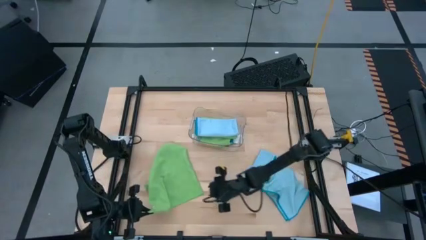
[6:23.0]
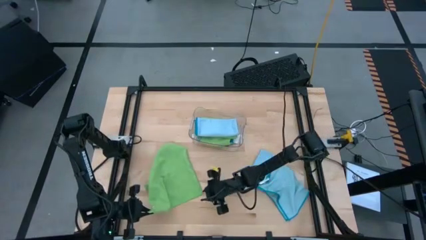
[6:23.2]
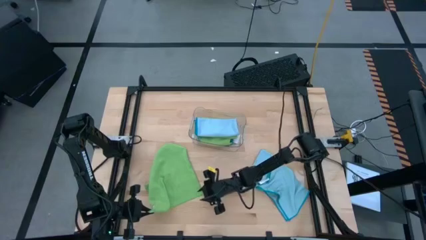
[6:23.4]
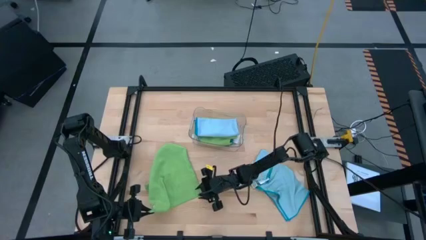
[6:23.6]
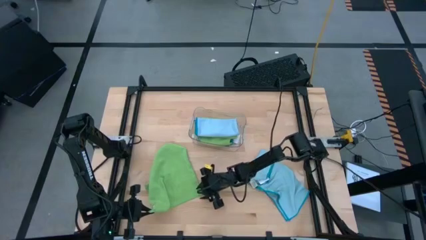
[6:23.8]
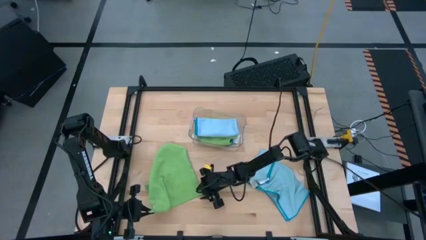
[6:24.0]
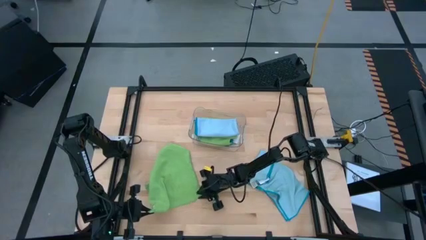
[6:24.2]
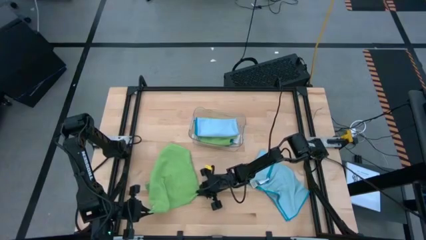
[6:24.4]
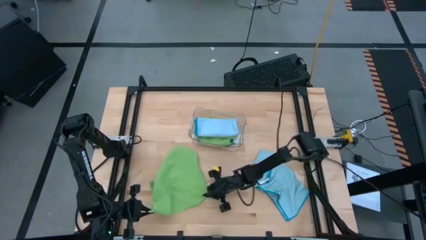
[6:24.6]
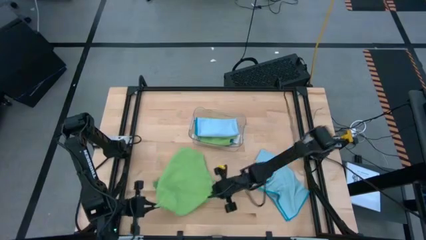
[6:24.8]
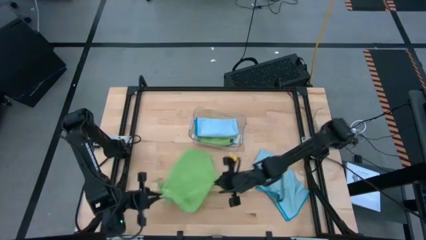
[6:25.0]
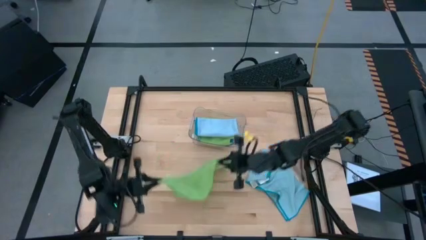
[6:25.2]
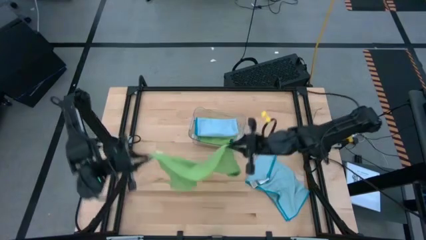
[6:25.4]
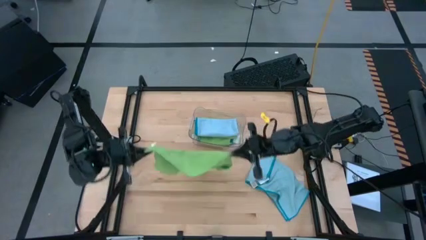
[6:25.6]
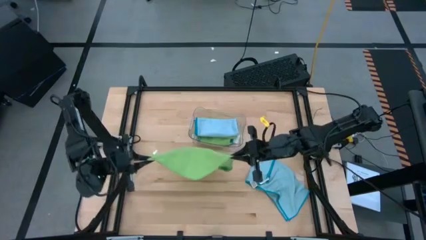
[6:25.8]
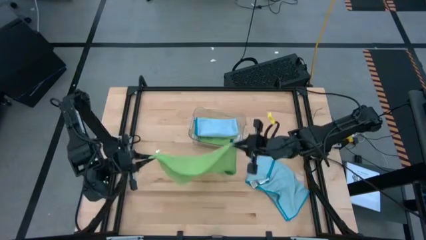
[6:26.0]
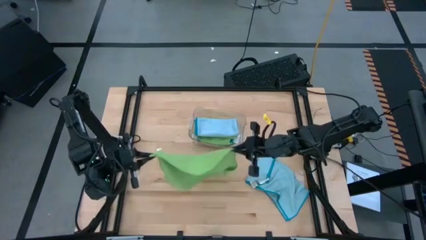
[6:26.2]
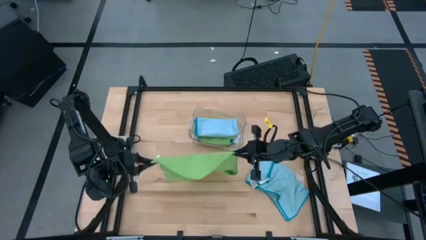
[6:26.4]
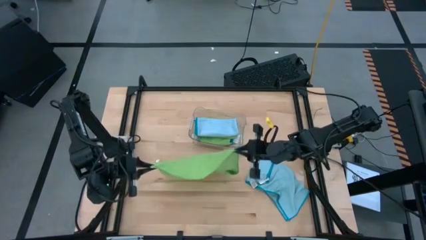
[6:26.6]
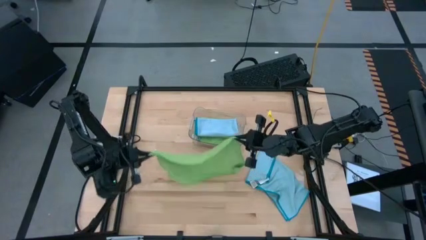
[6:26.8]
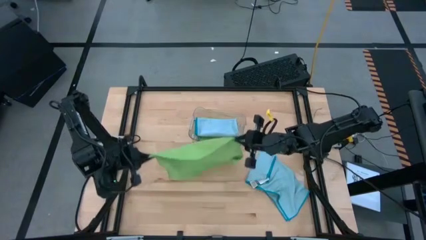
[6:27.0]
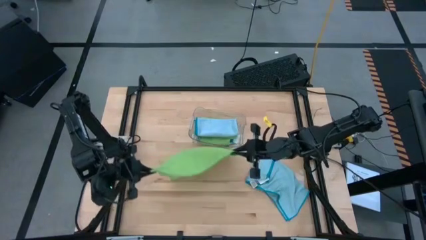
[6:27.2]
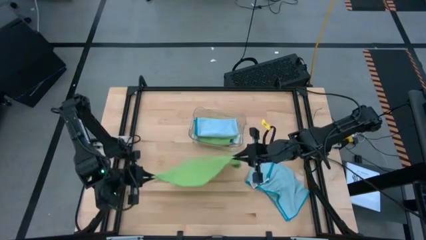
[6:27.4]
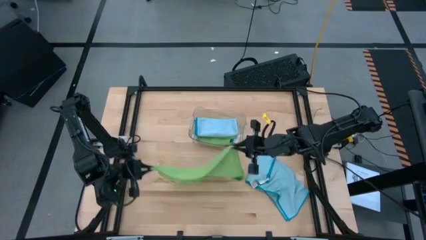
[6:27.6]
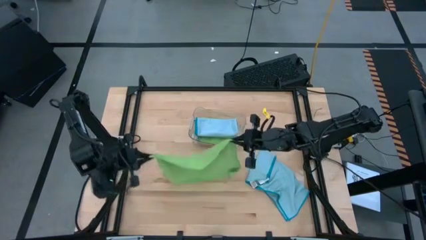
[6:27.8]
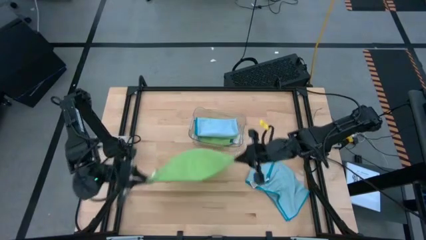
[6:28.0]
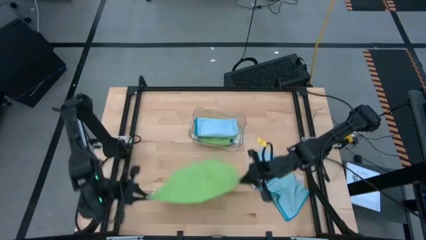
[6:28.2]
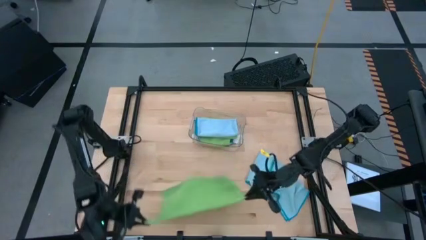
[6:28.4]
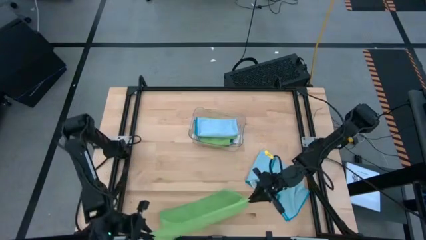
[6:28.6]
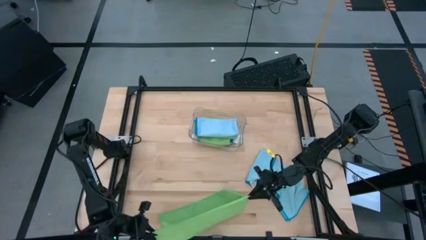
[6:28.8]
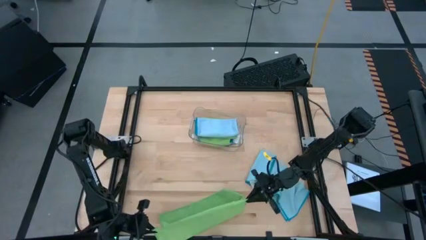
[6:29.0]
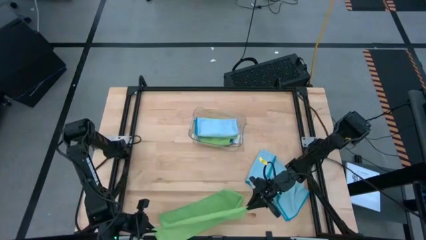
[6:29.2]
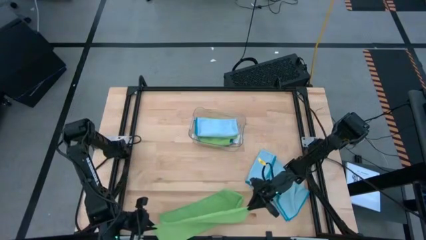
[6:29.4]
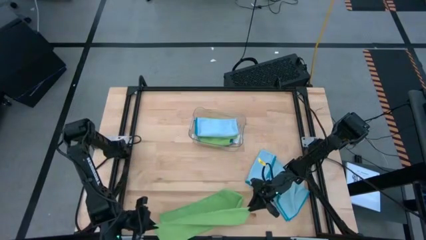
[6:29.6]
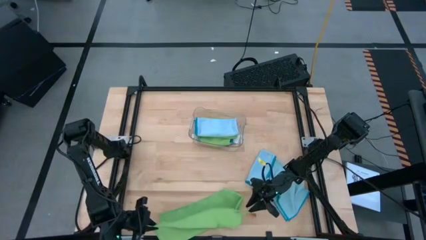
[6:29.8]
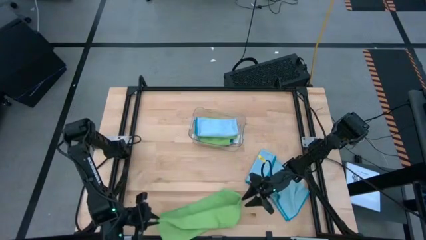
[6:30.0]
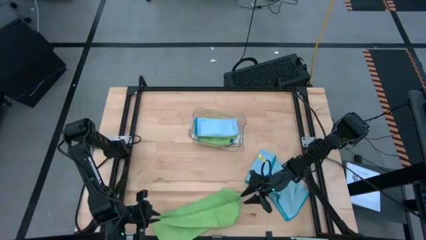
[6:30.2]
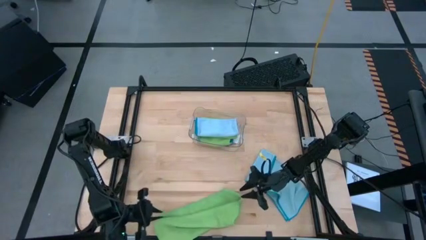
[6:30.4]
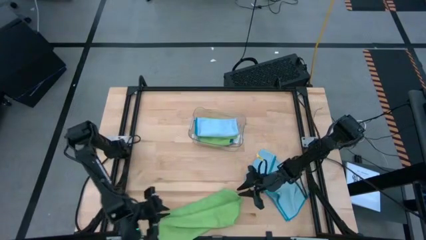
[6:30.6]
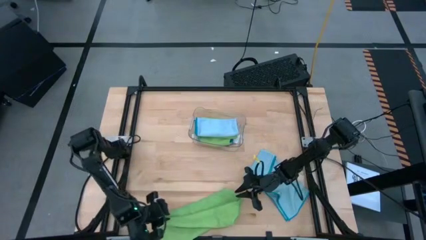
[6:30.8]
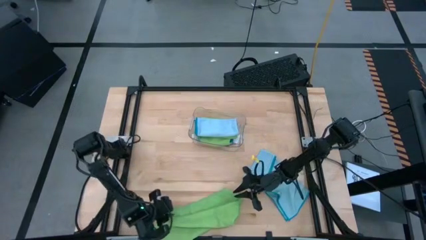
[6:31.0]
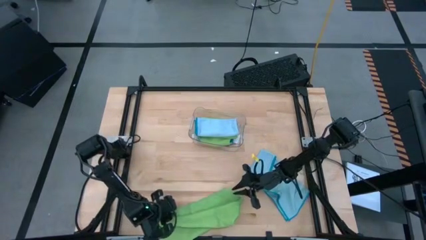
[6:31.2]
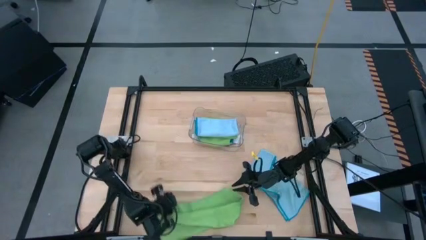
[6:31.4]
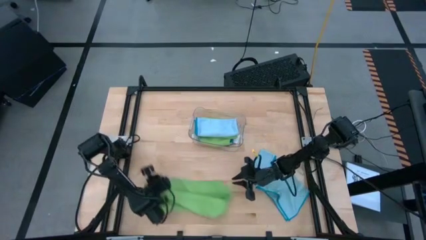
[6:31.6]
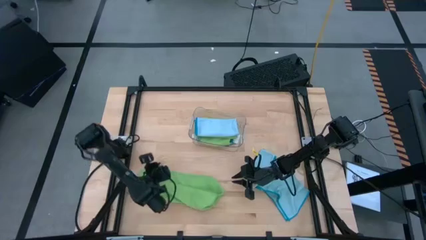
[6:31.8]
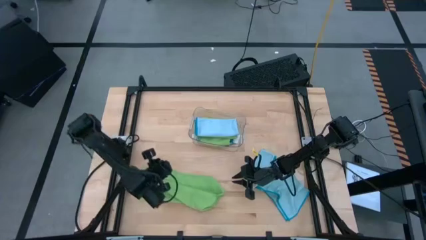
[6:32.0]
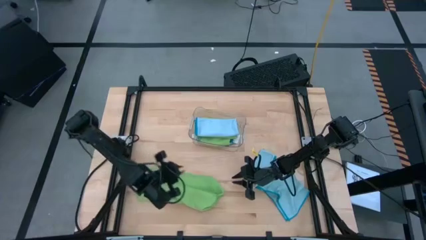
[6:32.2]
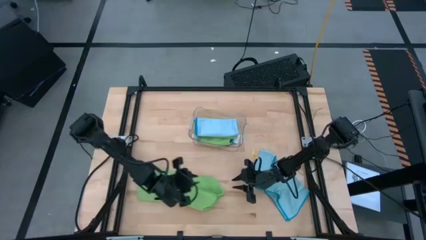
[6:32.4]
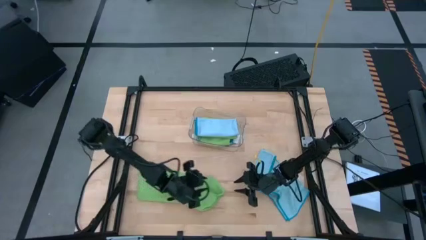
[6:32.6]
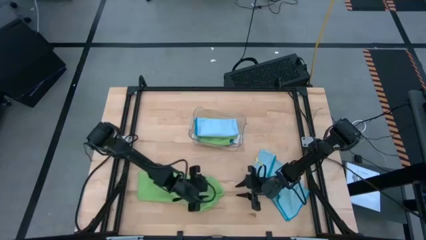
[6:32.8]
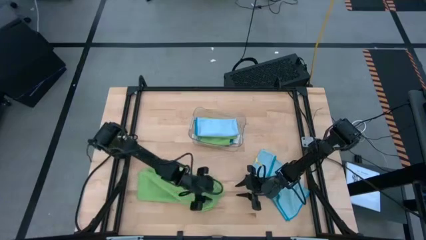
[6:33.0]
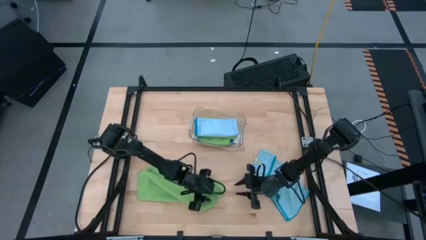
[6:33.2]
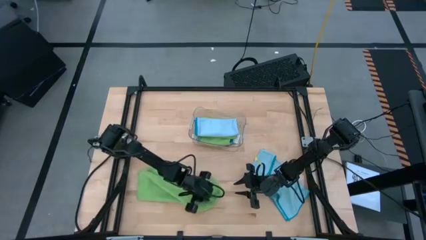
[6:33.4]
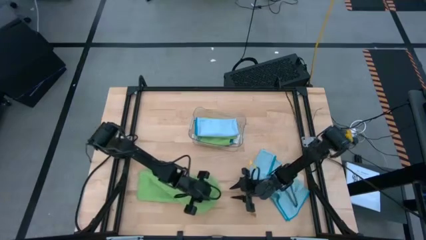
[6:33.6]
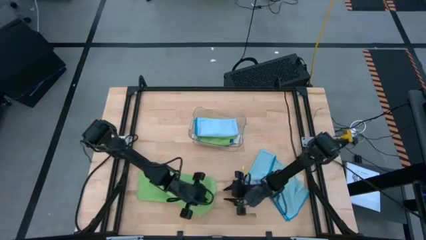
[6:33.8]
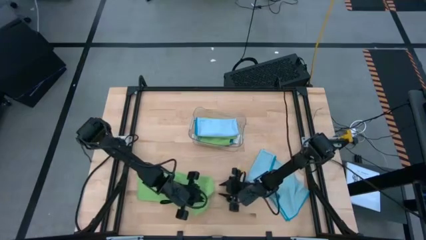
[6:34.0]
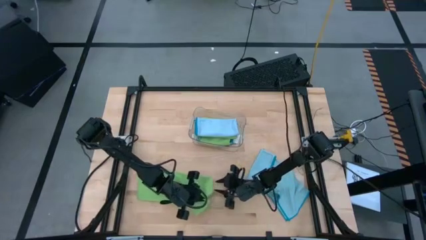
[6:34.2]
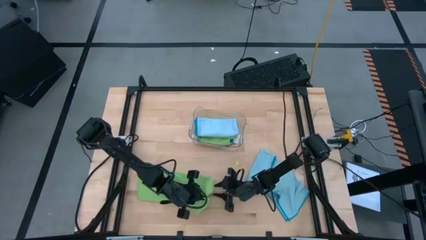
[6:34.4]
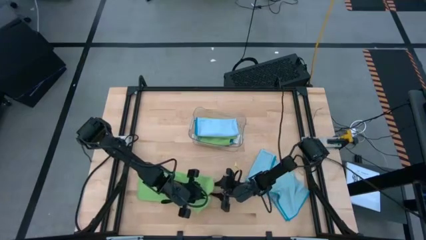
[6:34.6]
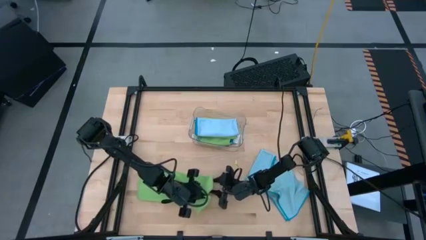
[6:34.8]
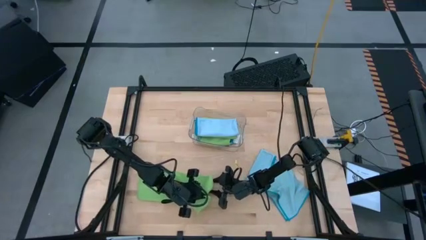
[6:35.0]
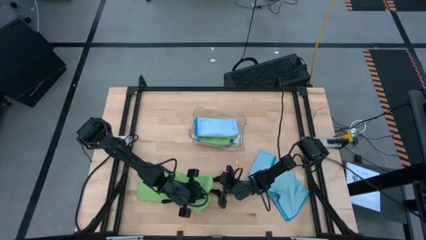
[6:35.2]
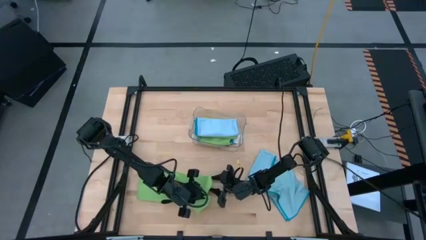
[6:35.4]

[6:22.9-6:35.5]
Task: Fold microfiber towels
Fold the green microfiber cloth

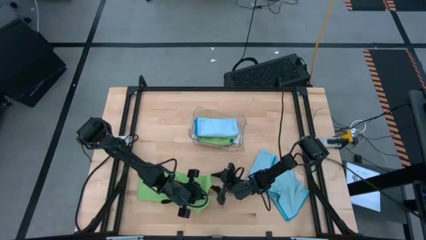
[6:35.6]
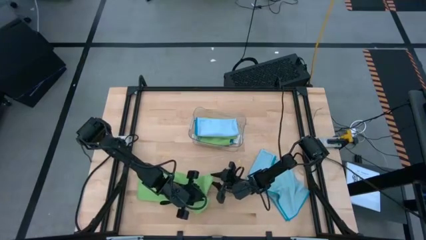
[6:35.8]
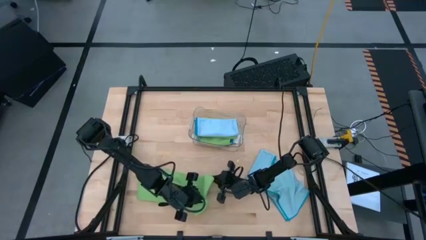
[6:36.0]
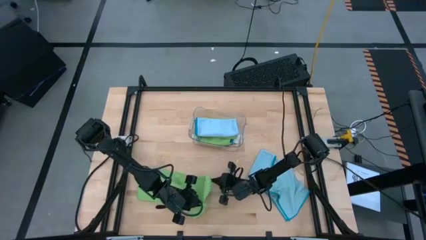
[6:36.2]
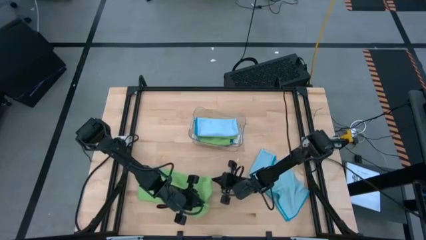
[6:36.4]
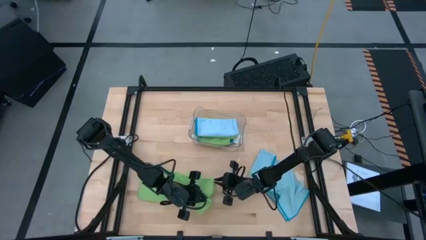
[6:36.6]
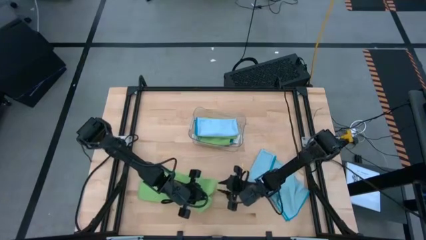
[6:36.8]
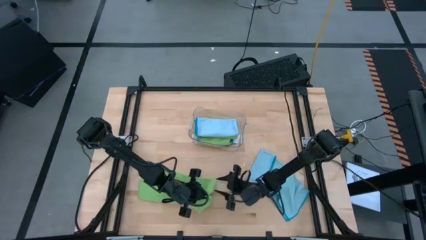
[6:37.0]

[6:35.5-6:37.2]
Fold the green microfiber cloth
